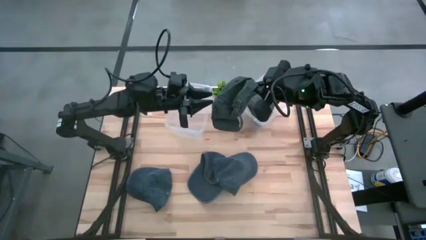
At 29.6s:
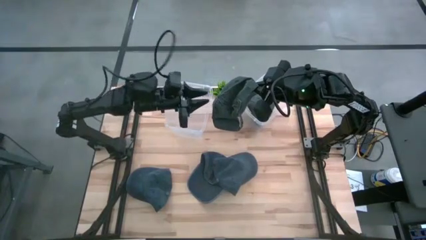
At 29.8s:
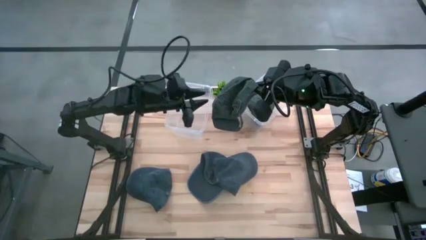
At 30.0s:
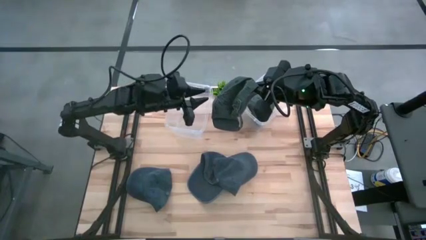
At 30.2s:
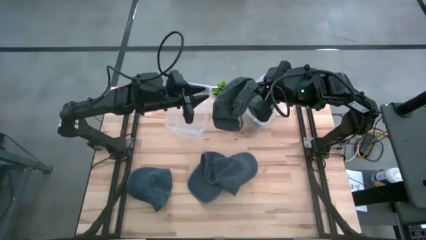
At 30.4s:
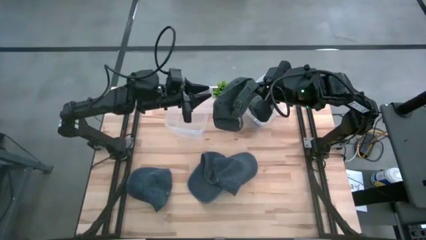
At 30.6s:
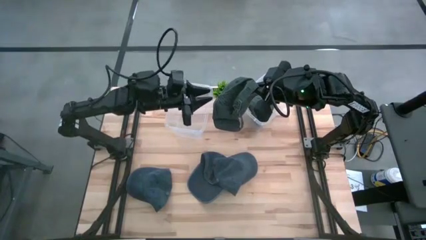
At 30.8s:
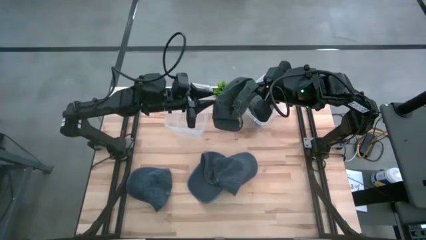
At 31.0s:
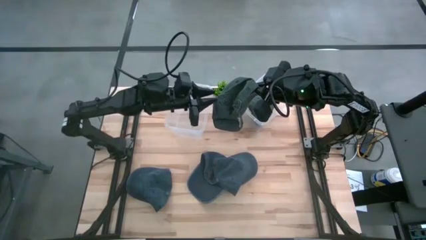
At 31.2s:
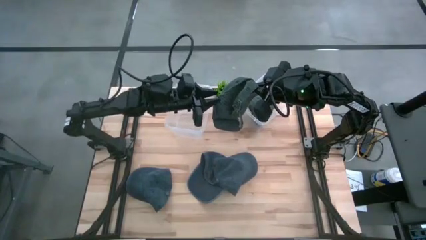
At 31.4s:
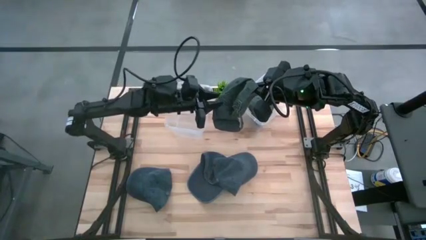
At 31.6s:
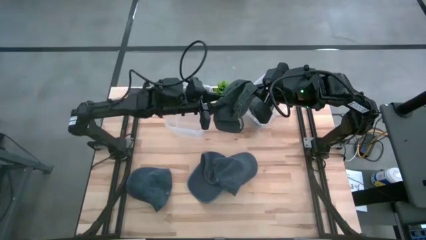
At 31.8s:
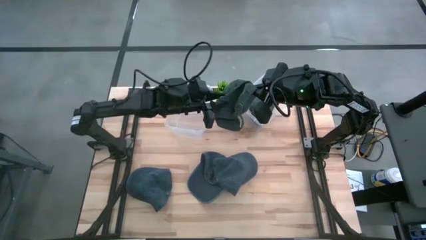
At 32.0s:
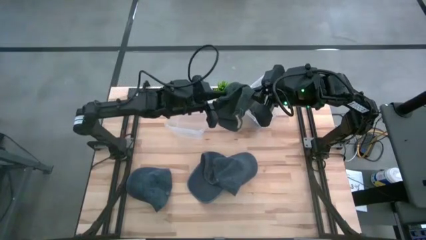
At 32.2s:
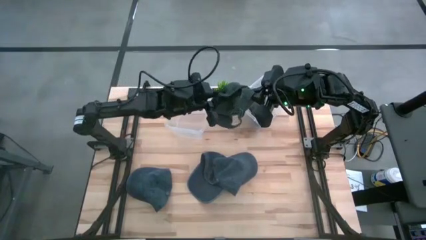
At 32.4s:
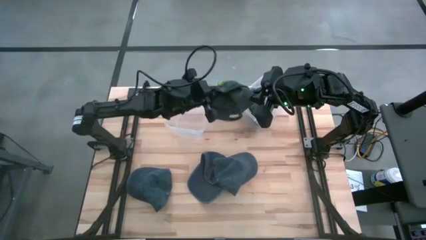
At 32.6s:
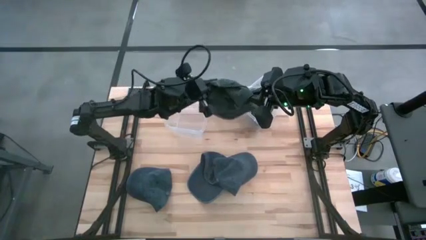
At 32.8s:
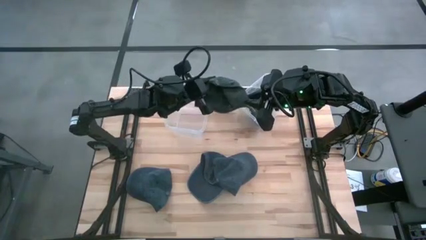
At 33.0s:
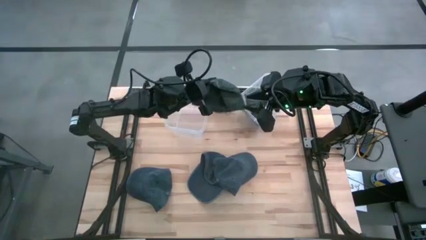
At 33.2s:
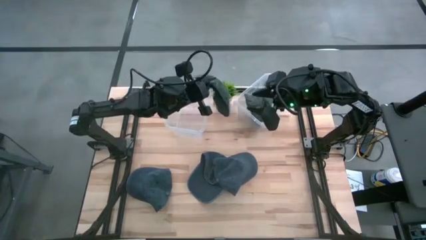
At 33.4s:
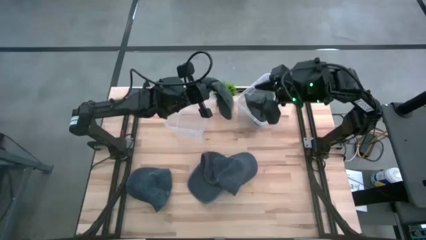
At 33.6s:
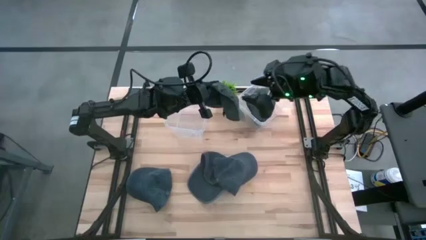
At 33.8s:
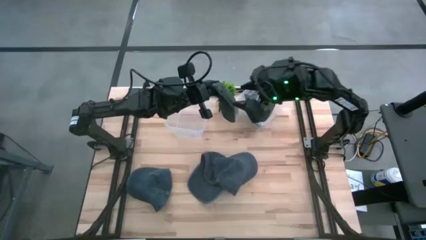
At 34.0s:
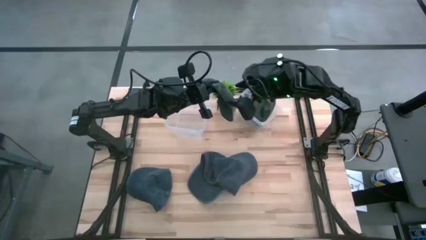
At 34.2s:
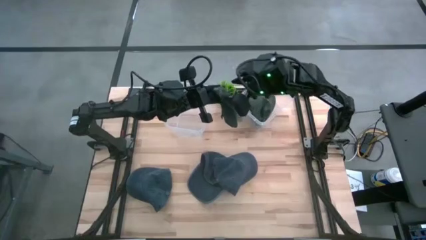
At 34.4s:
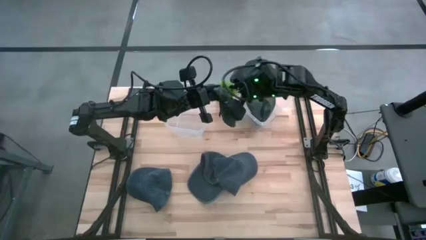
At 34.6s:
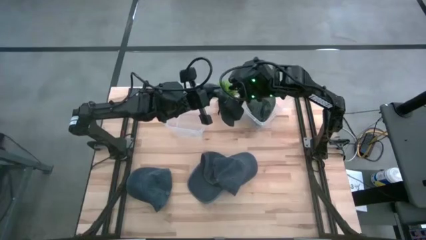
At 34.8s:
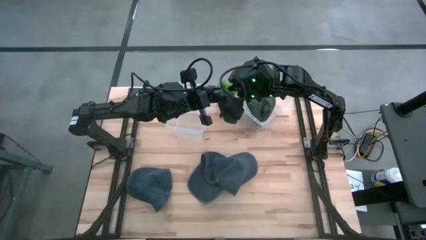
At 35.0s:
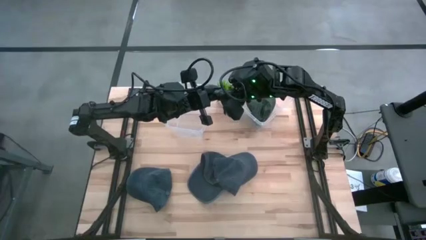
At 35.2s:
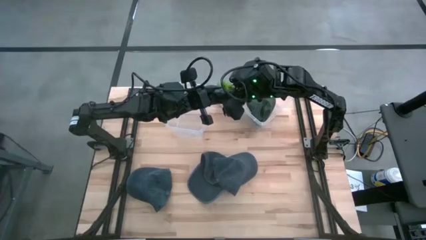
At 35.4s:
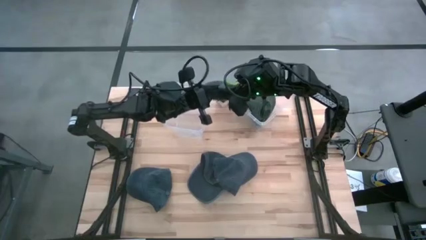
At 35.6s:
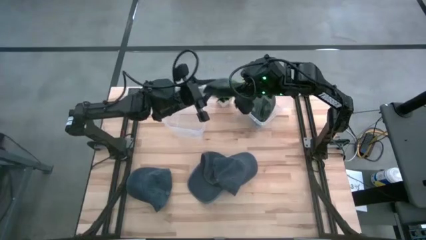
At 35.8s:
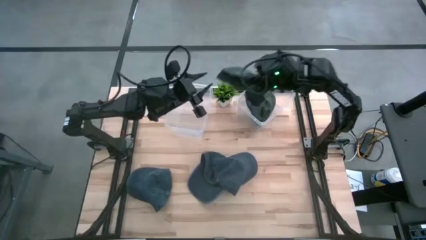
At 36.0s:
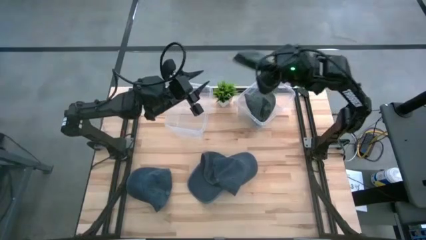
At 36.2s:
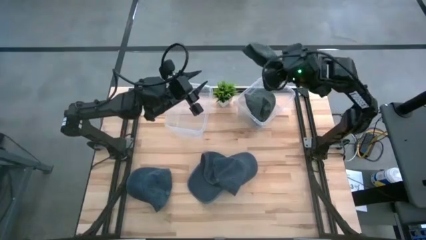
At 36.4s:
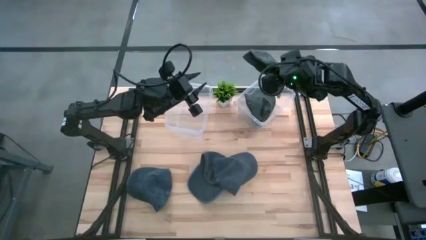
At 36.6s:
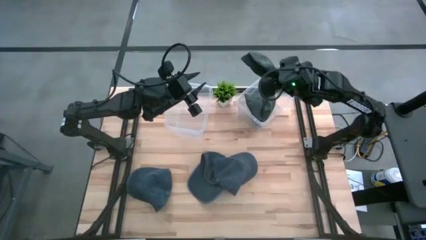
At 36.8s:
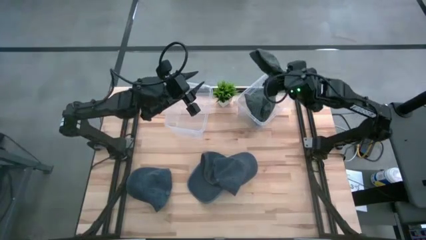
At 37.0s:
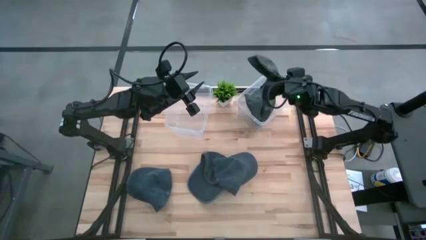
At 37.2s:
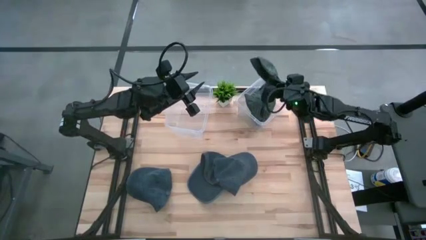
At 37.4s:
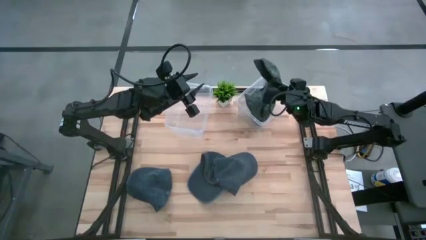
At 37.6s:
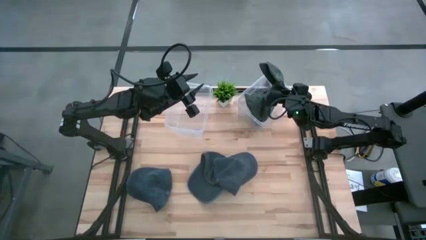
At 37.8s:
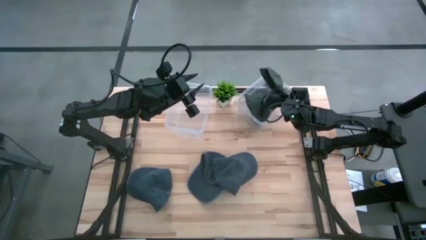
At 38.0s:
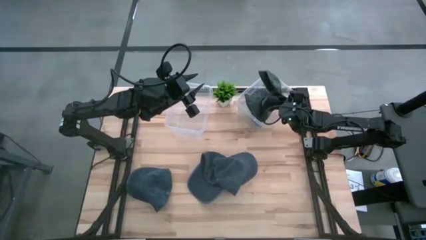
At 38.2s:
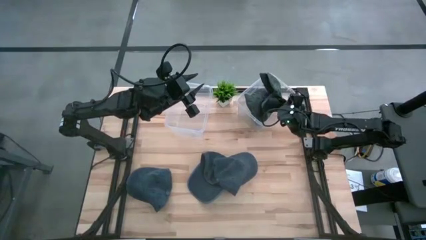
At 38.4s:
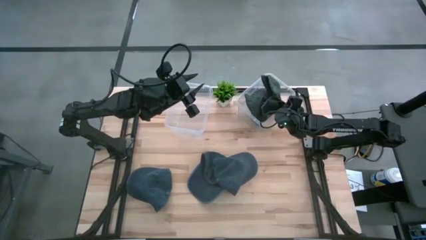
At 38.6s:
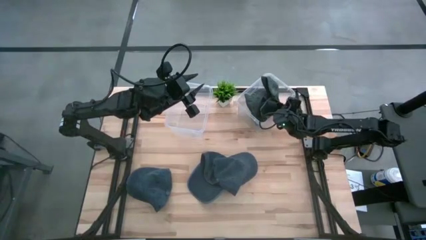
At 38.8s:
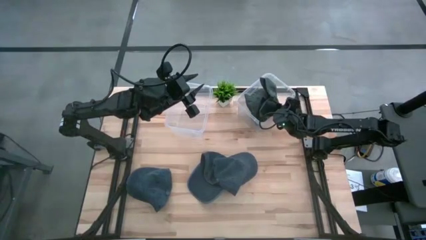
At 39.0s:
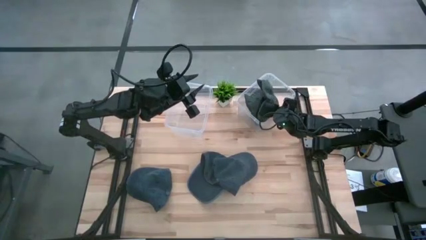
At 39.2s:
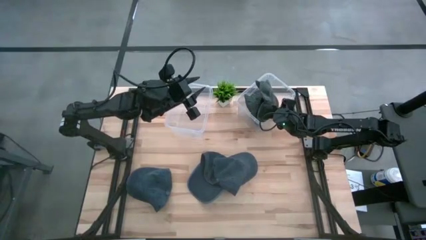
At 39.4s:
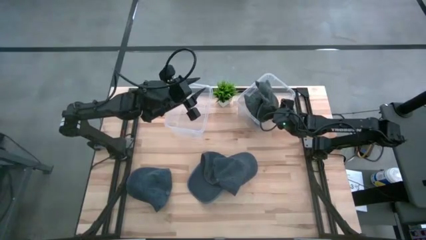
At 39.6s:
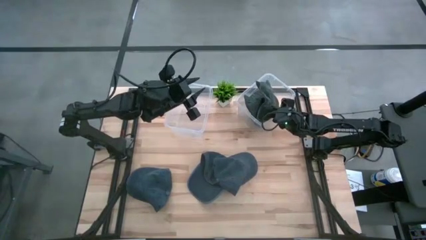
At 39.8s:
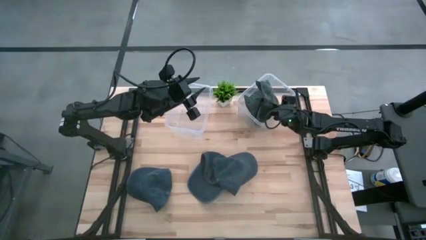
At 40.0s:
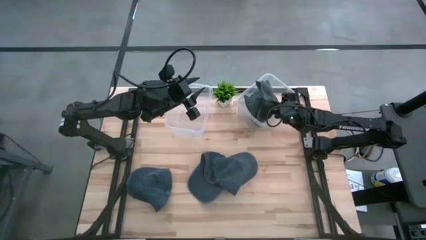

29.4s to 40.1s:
Task: Pick & Place hat
Put the green cap in the right transparent bin
